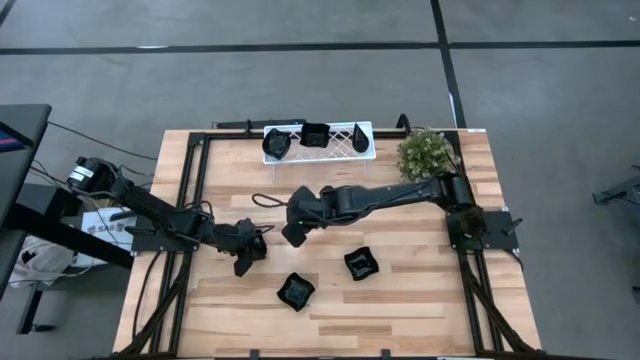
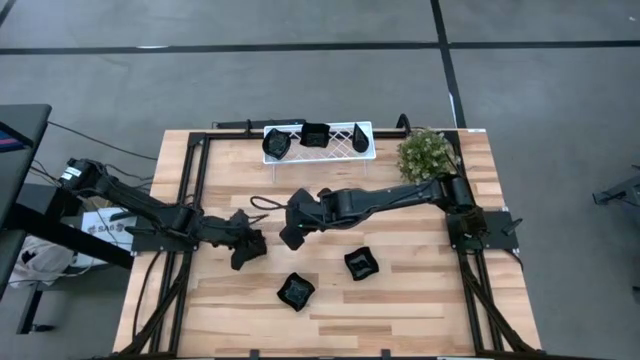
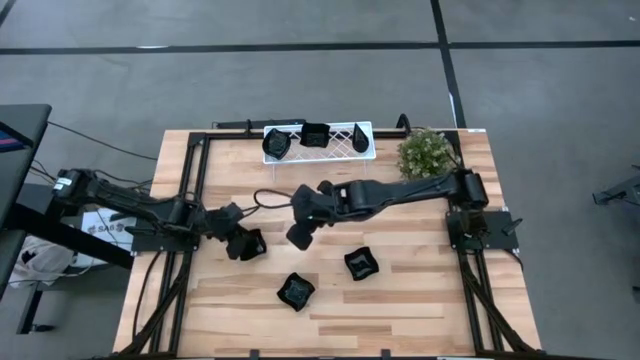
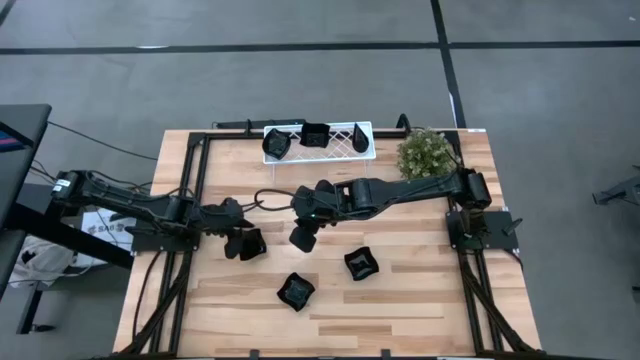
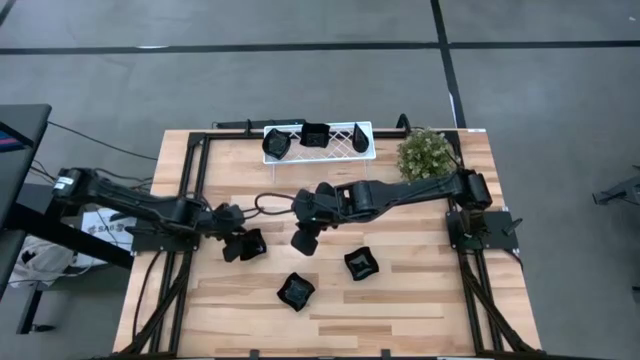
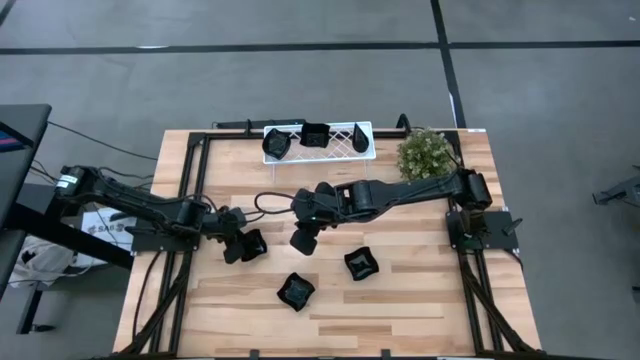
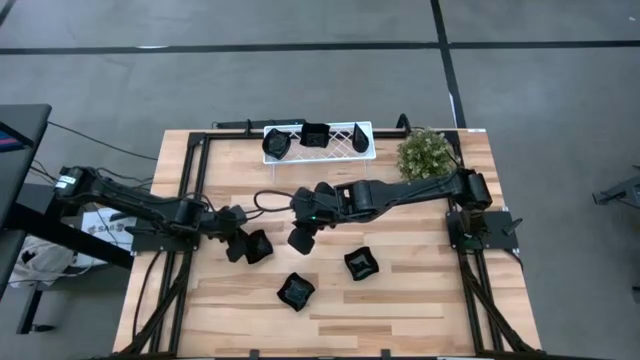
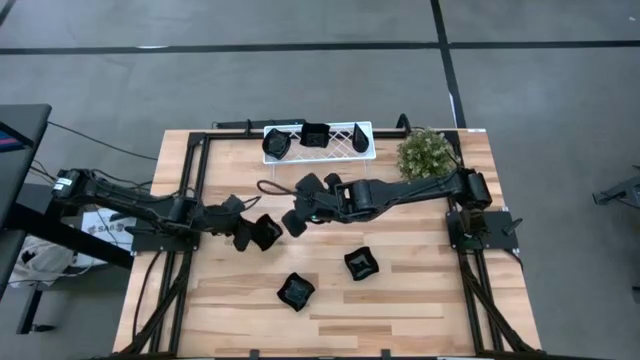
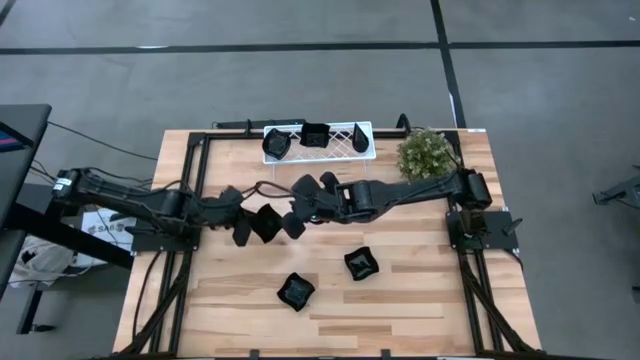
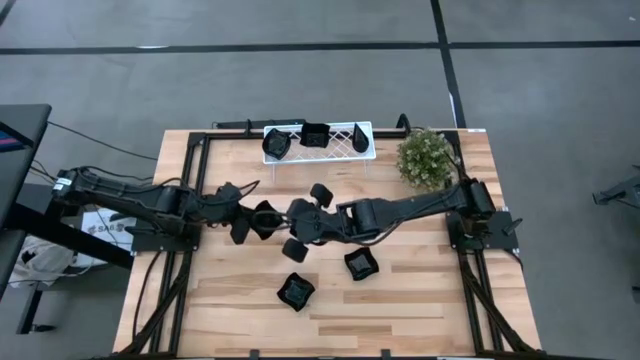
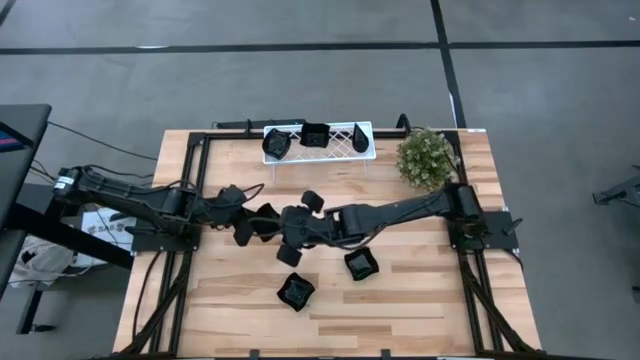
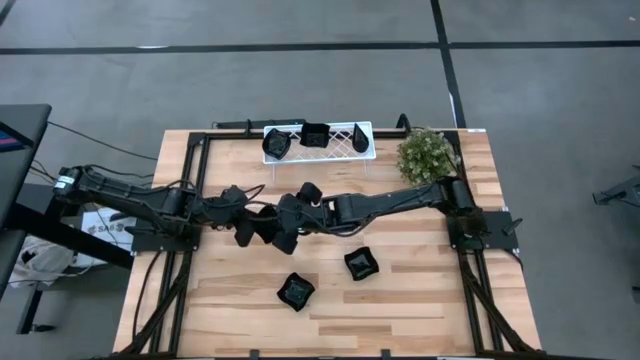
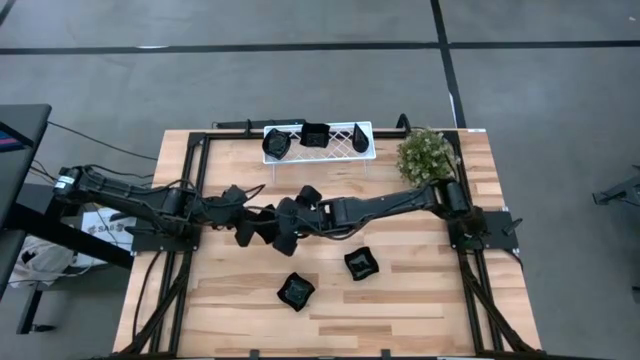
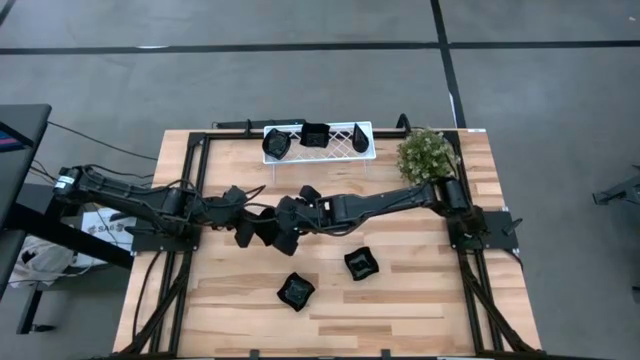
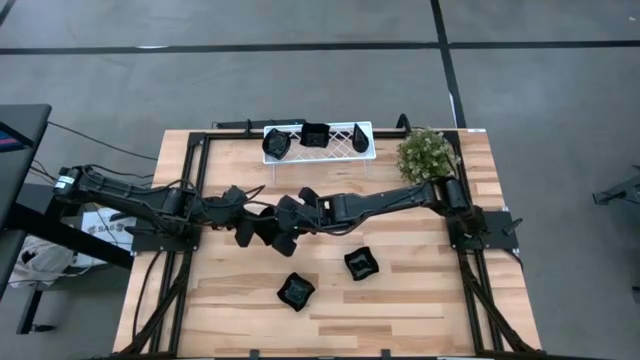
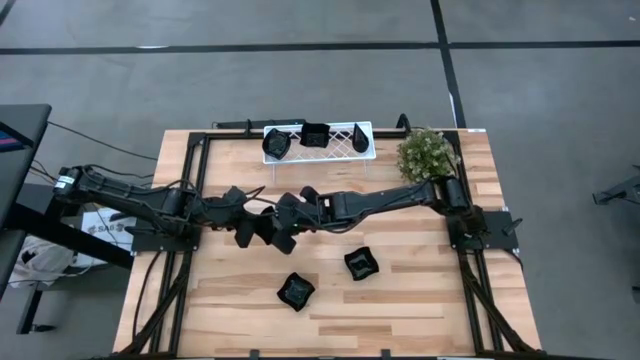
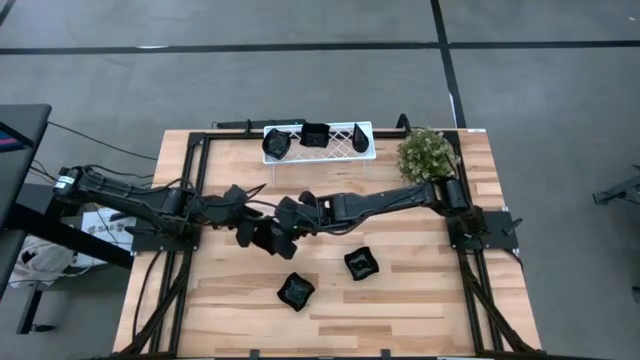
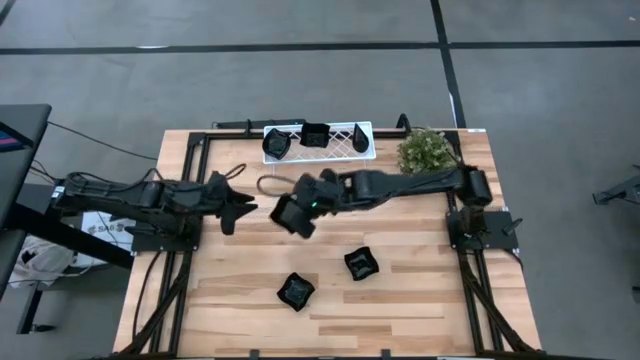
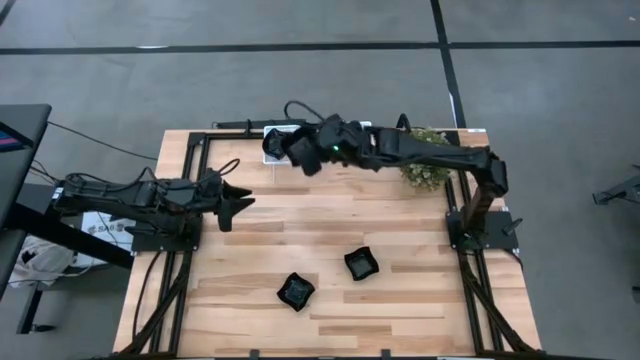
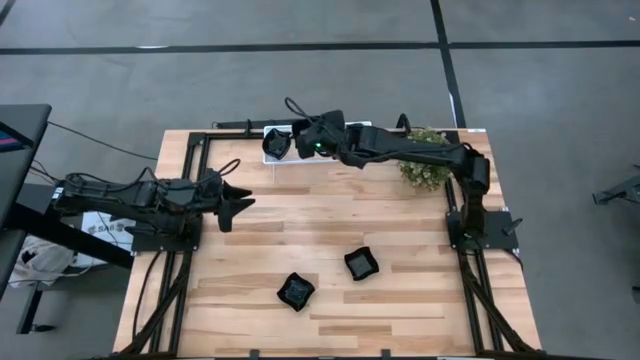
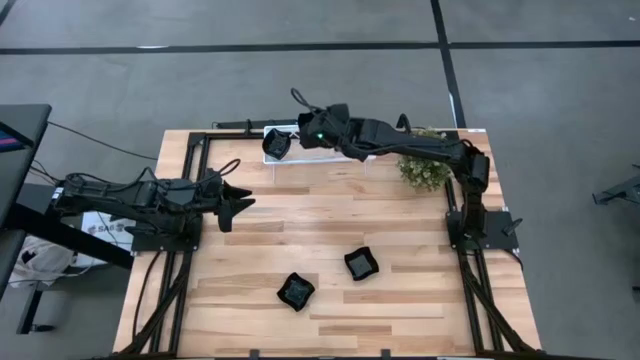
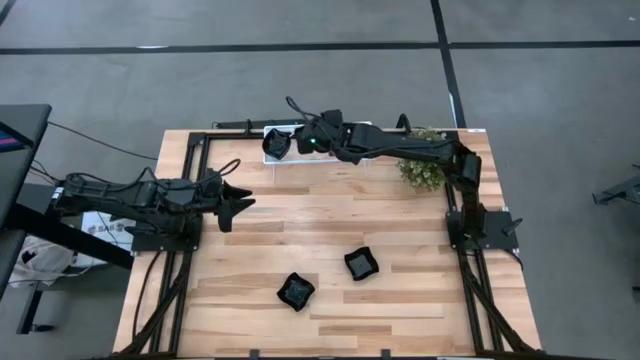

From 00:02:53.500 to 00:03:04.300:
Task: Pick & Place Mini shaped plates
Stack the black distorted square plate on top of the black distorted square plate on the shelf

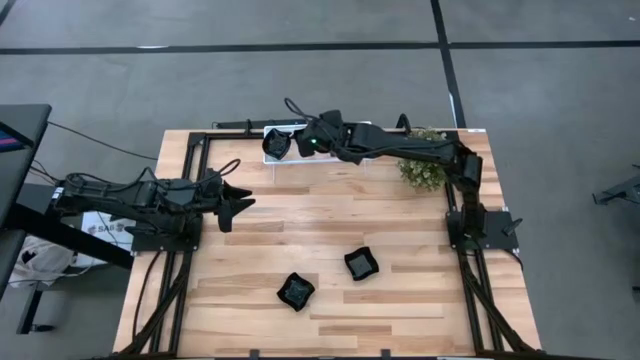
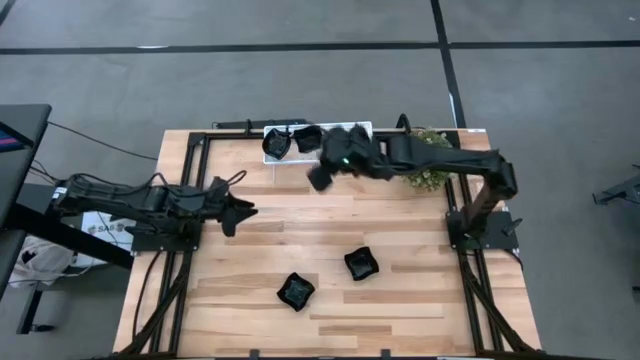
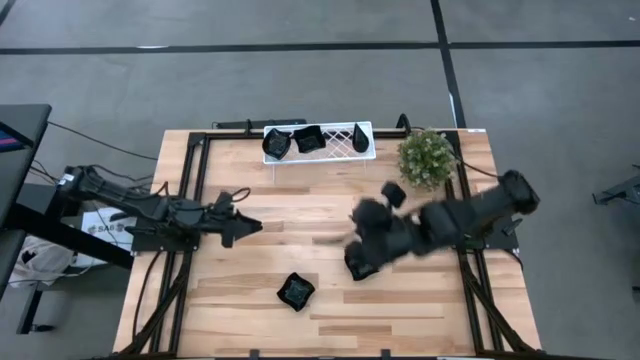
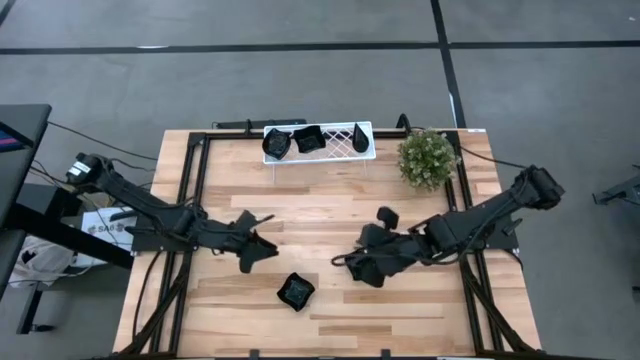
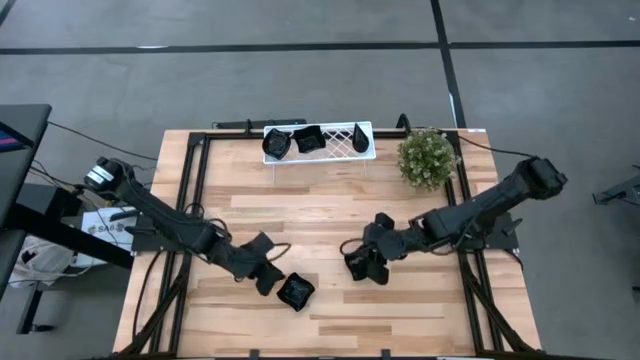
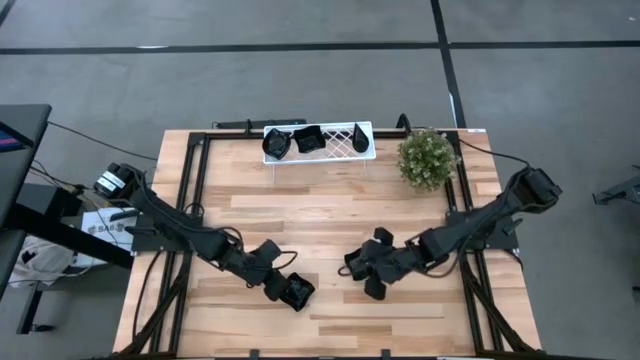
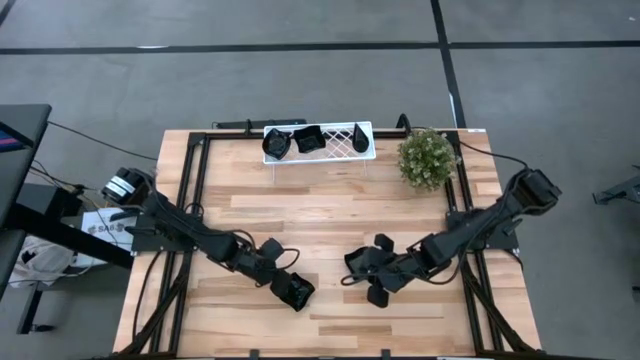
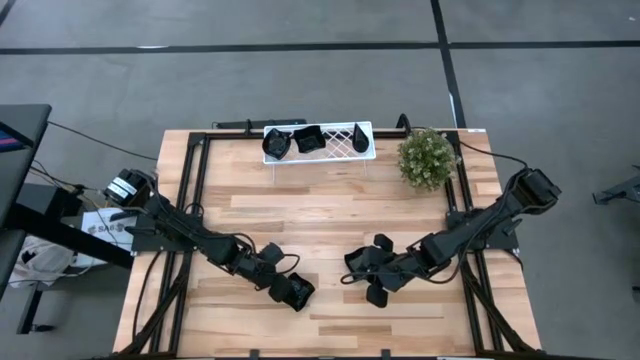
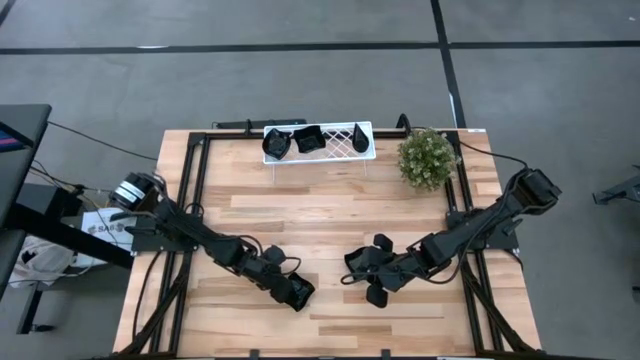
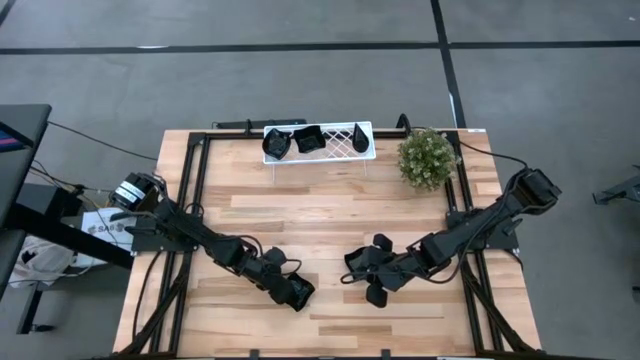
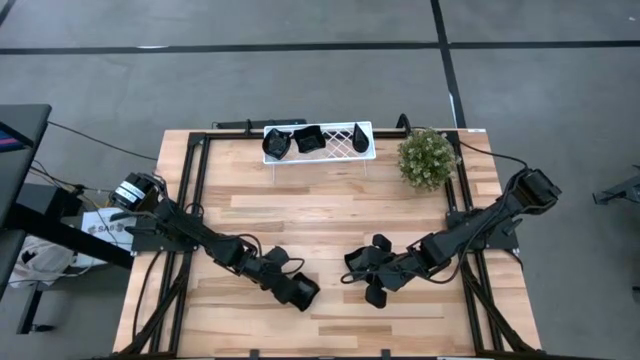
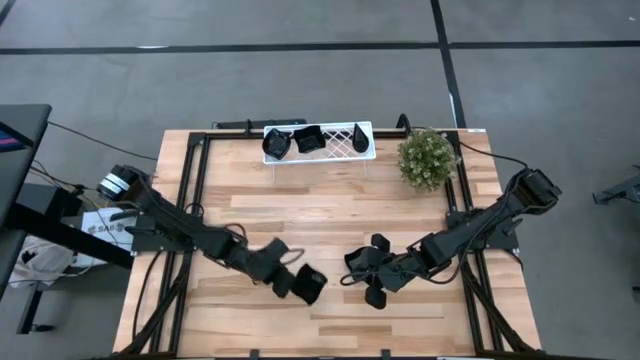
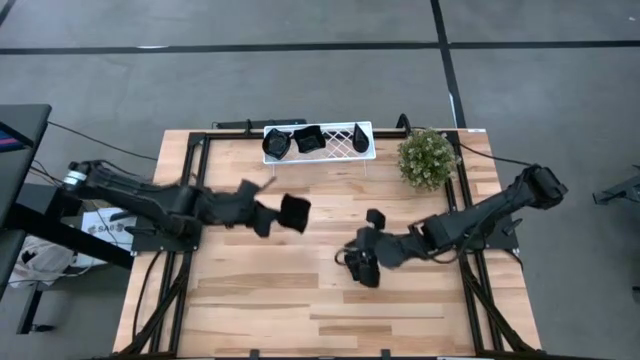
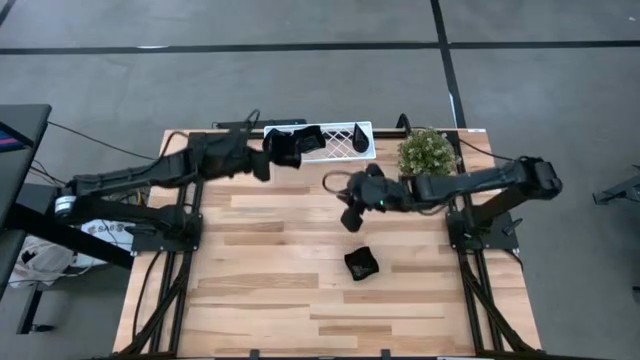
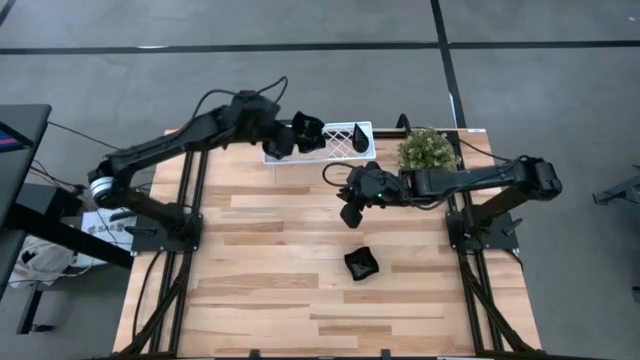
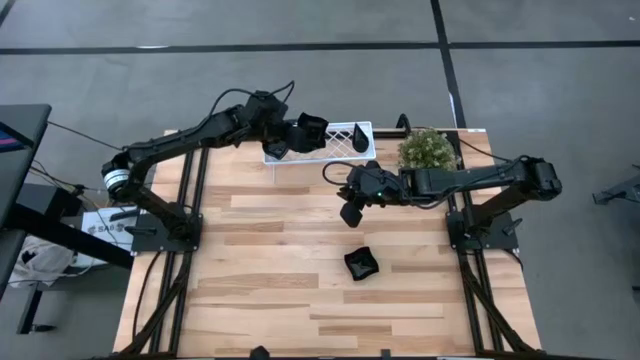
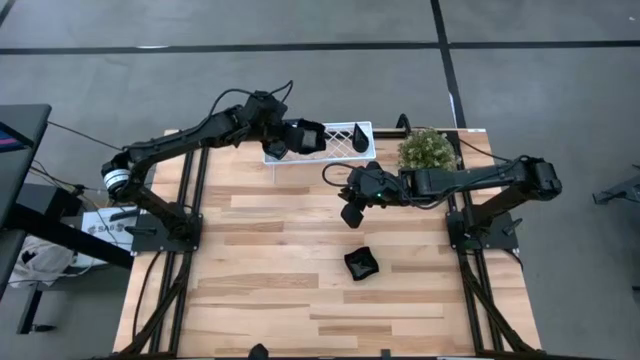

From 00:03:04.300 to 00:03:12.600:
Stack the black distorted square plate on top of the black distorted square plate on the shelf

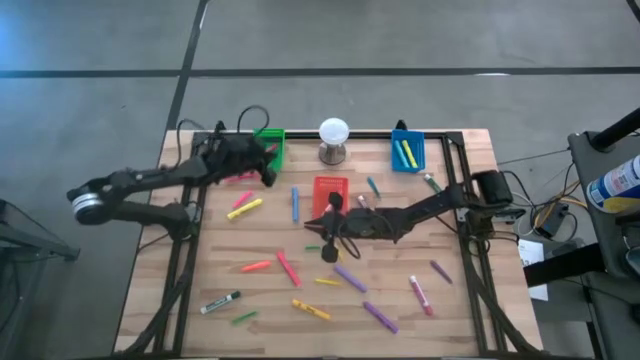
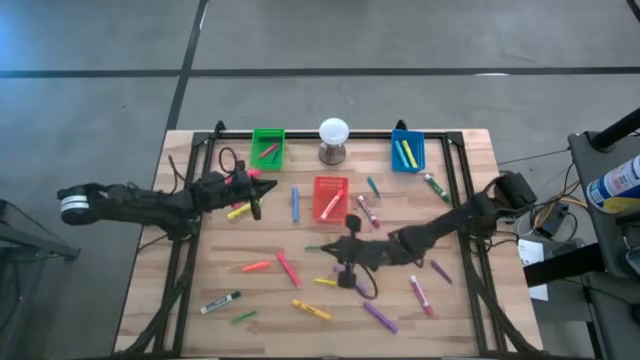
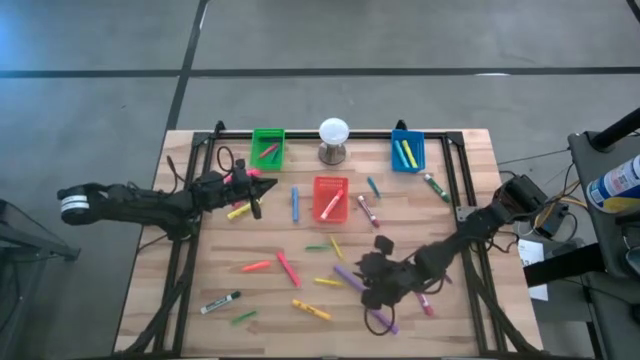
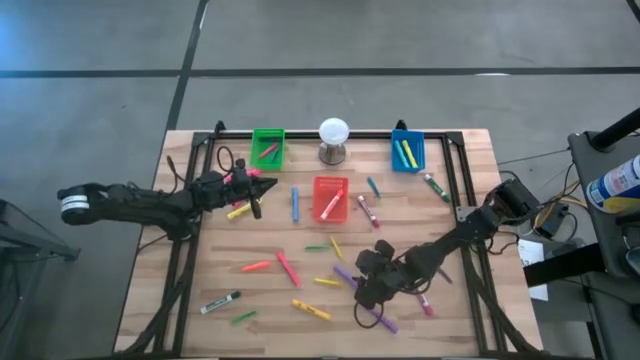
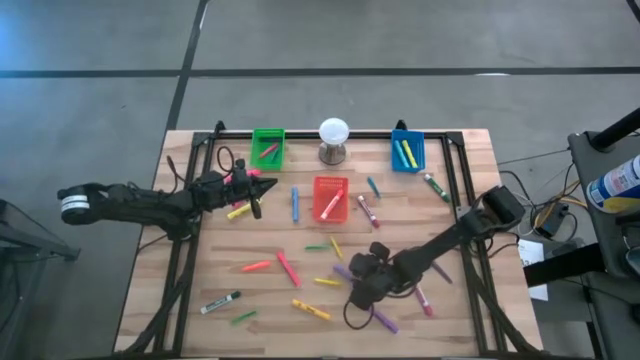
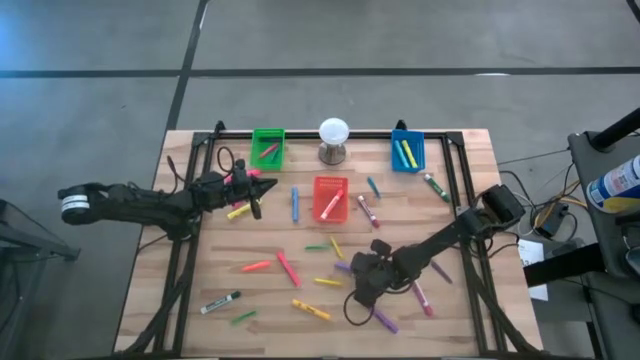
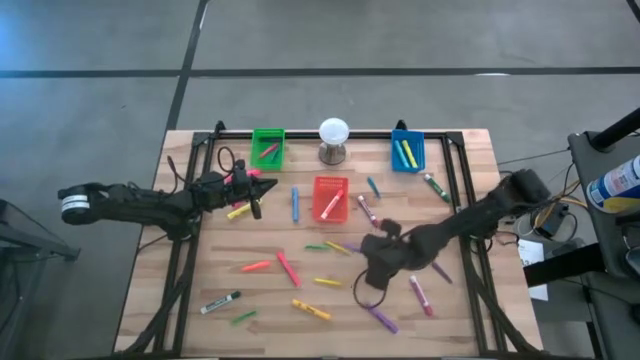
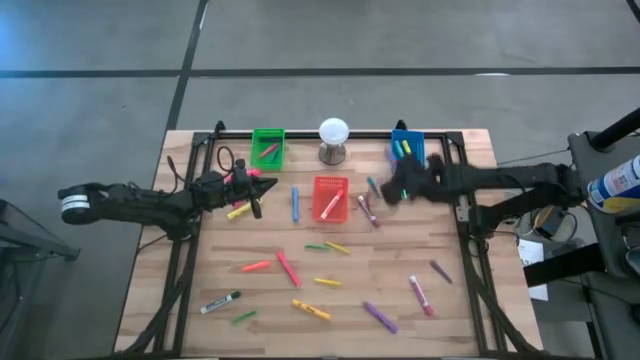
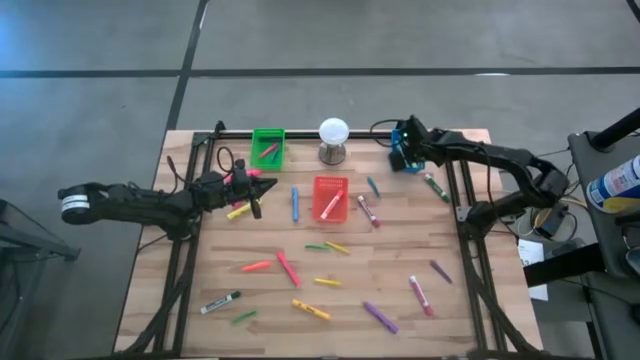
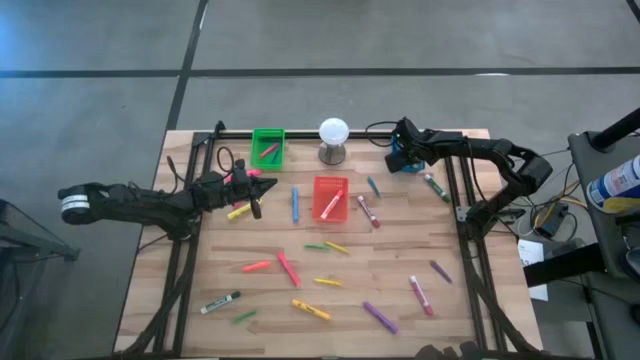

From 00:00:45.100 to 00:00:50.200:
Task: Pick & Place Markers
Put the top purple highlighter into the blue bin
